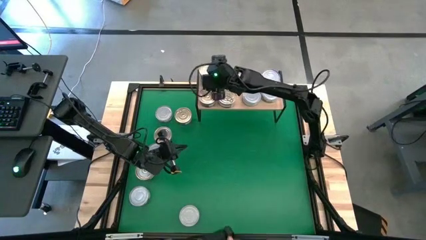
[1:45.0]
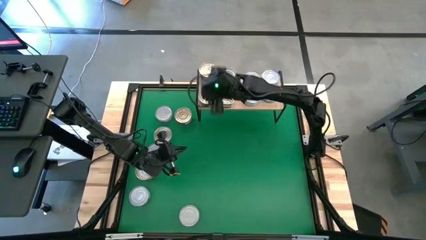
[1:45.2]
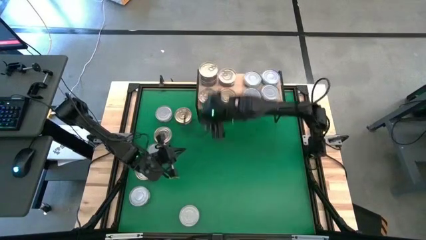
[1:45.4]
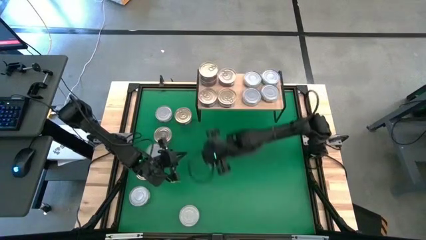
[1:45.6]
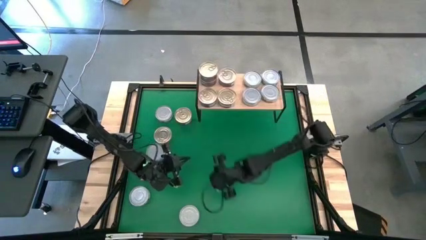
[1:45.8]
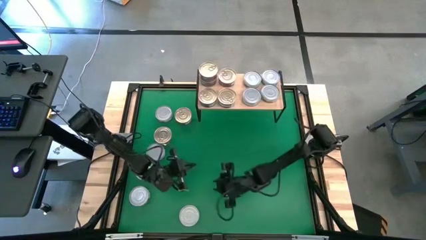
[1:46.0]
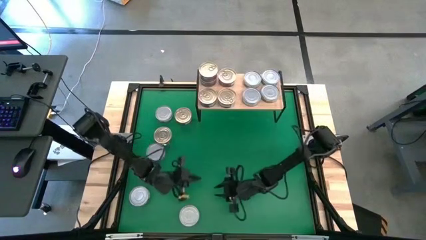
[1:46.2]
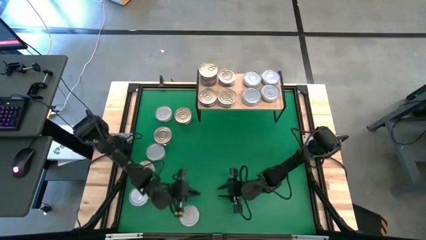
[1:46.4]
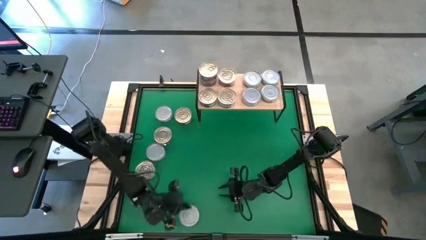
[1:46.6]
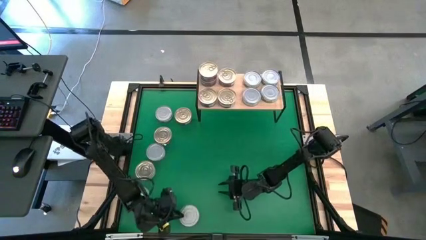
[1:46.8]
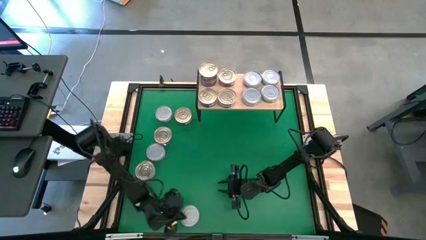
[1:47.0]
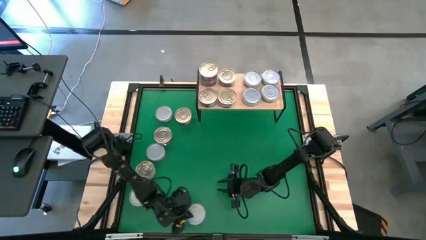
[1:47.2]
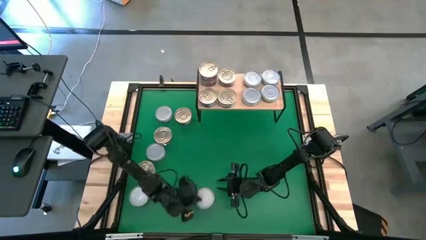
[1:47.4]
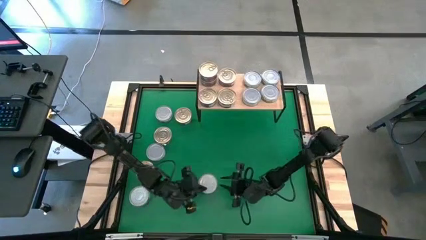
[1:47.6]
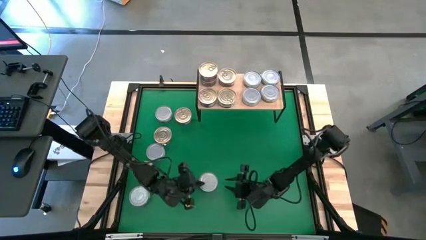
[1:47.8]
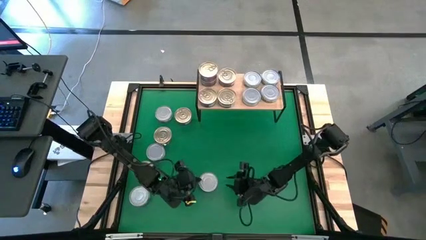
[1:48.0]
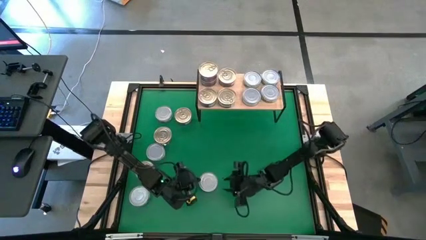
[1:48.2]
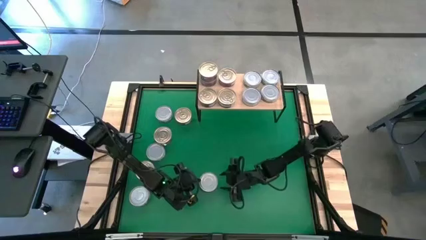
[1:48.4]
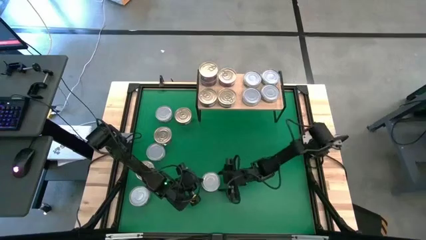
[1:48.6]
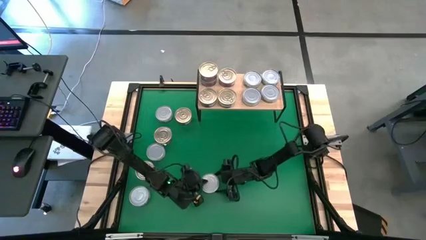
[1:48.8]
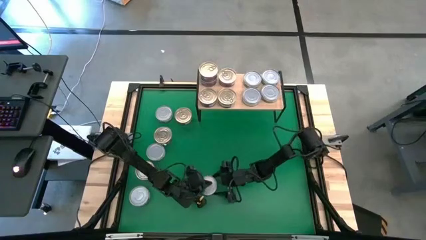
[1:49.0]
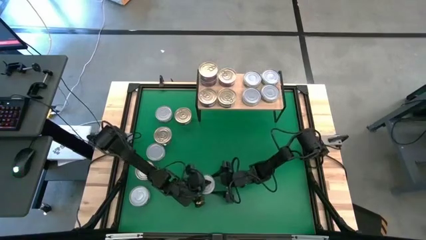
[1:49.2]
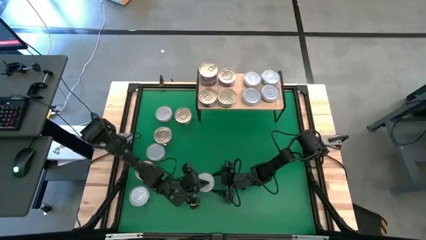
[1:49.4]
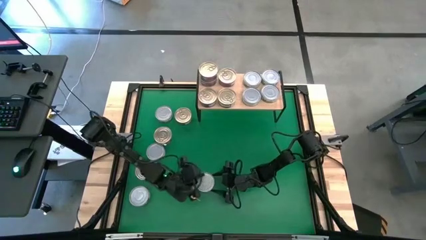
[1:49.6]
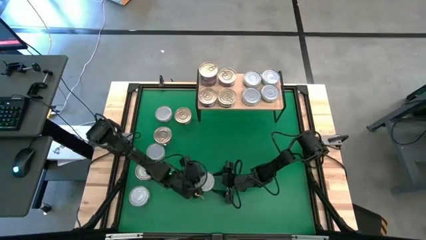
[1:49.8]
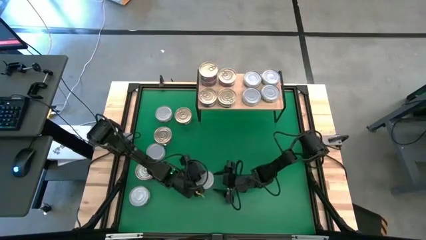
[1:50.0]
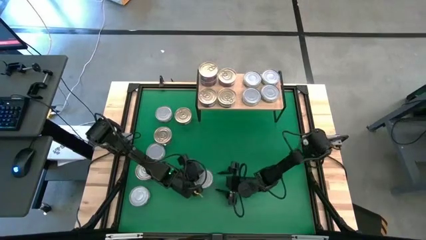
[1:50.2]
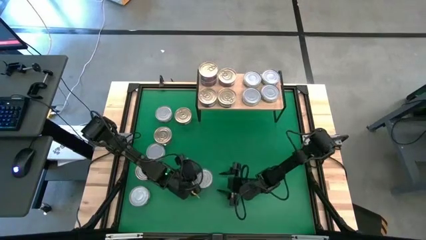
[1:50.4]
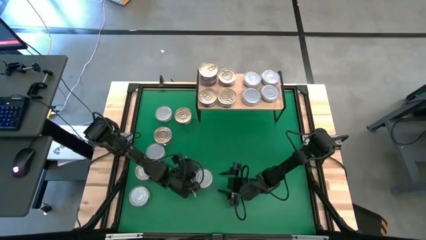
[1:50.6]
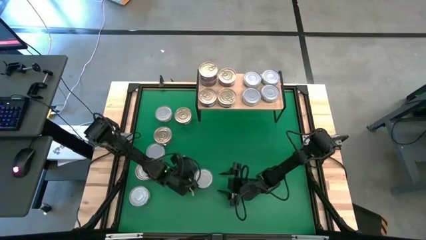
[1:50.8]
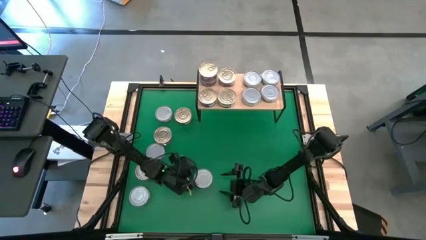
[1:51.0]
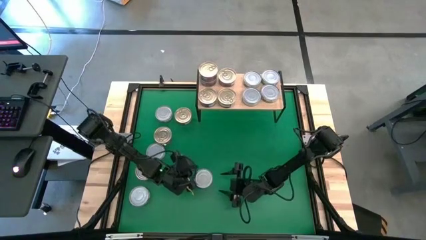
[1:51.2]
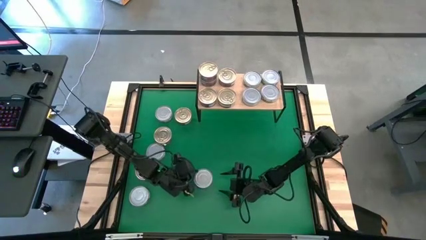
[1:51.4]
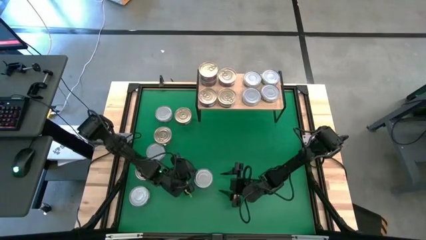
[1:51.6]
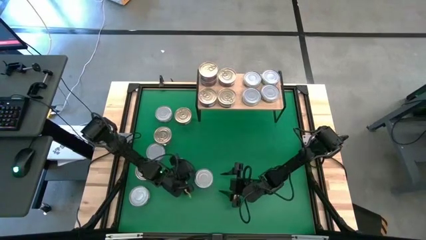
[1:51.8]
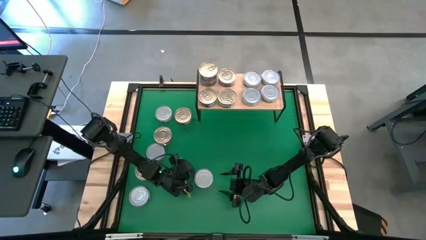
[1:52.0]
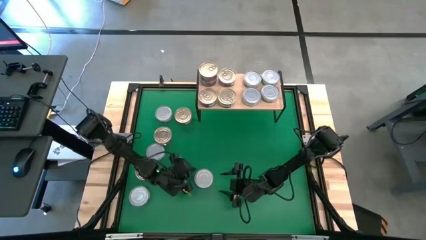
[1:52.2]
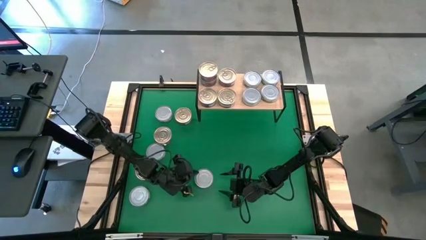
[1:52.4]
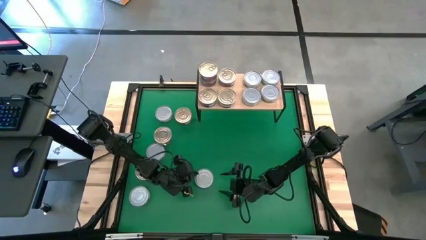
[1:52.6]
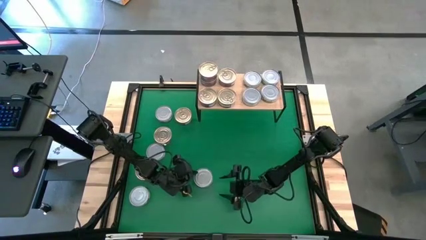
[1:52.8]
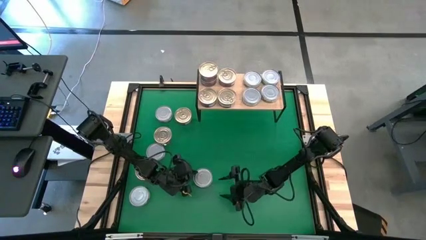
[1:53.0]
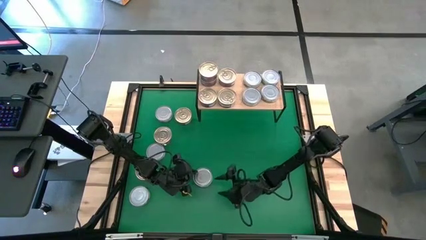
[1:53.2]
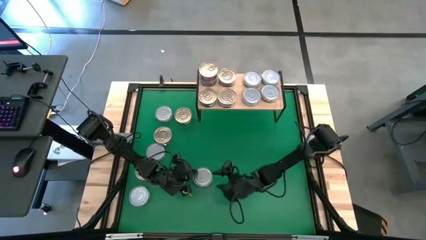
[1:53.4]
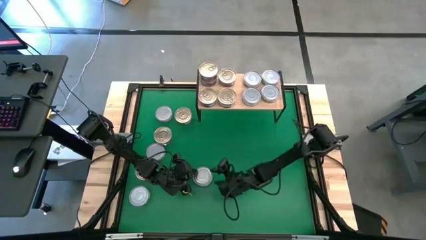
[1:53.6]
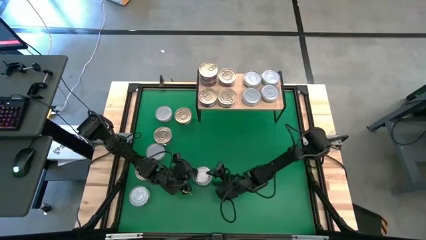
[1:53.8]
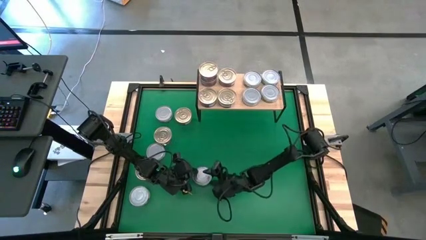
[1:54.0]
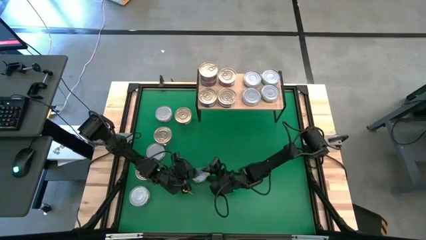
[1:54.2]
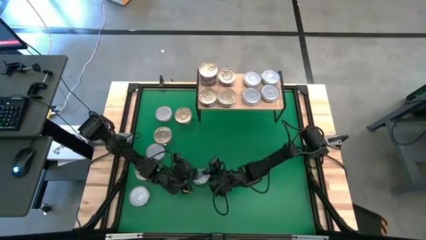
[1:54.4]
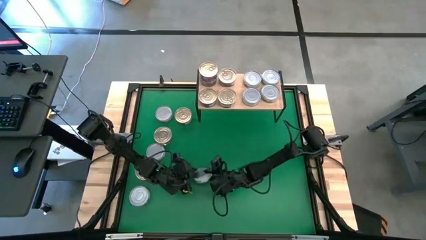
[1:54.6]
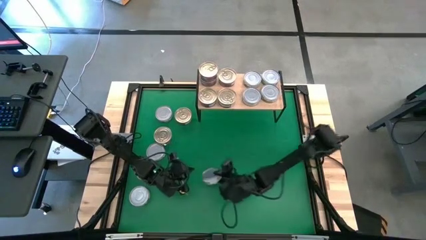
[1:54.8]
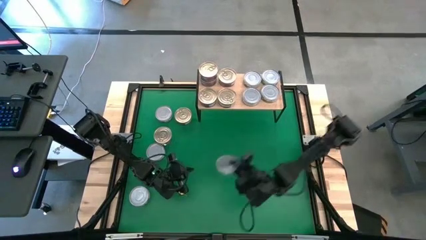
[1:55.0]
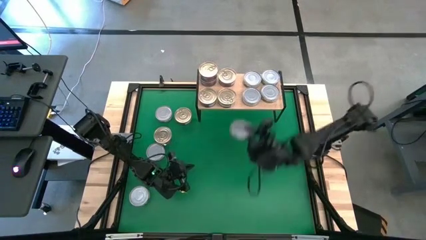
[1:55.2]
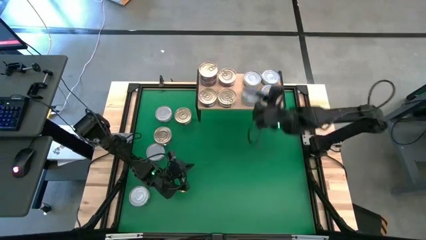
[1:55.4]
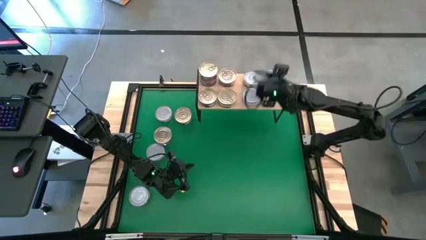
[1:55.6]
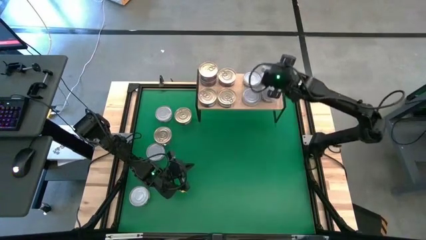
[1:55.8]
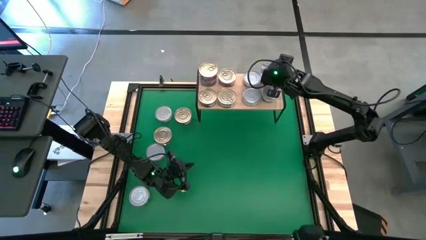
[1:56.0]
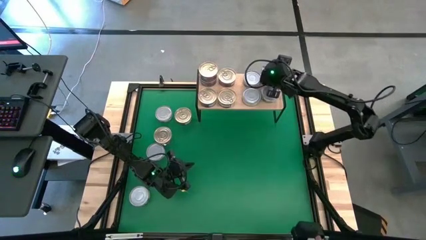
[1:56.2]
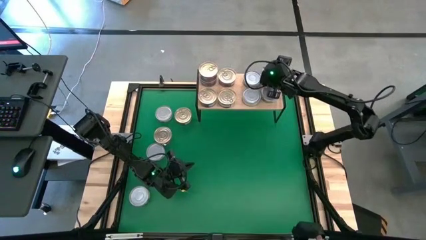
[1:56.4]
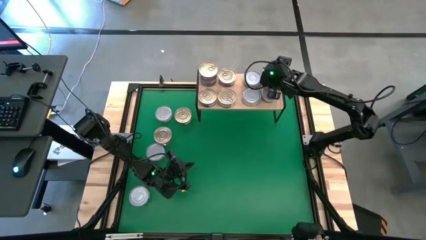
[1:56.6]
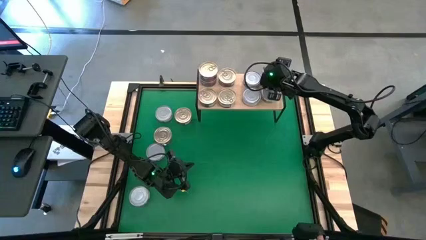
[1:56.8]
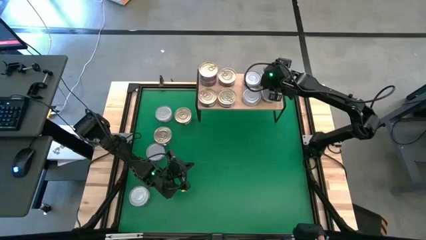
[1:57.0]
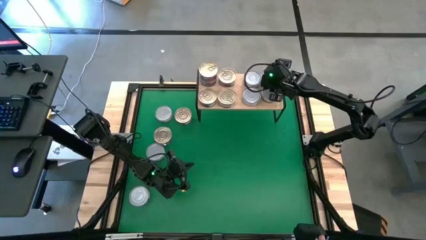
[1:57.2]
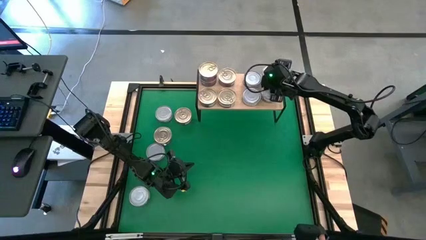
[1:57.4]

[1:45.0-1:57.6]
Task: Stack canned seafood by type on shelf
Stack the green tuna can on top of the top right green tuna can on the shelf

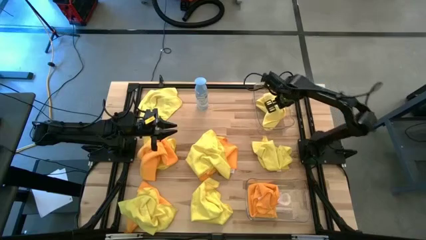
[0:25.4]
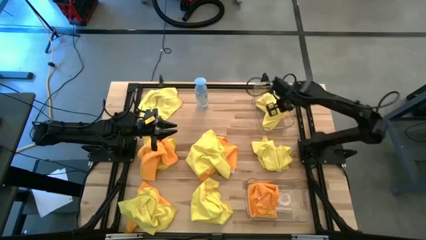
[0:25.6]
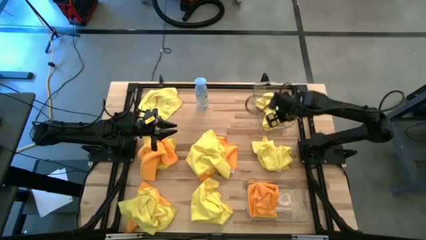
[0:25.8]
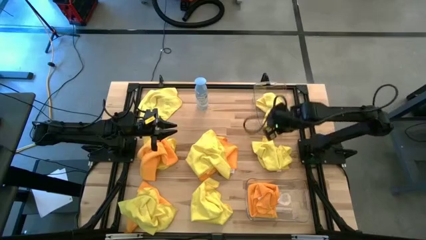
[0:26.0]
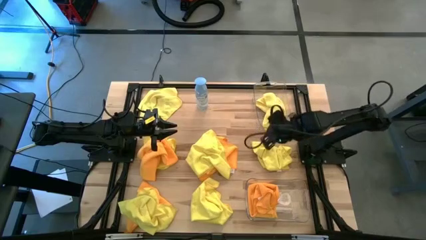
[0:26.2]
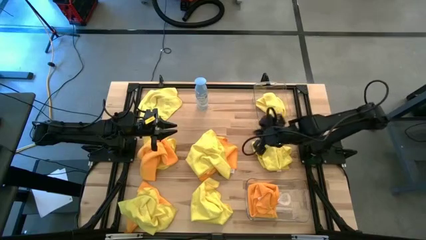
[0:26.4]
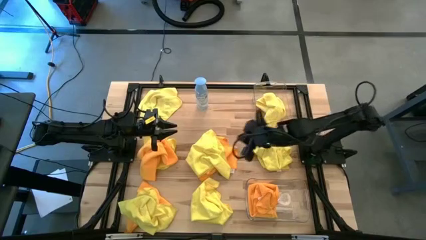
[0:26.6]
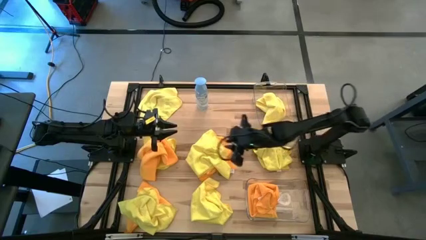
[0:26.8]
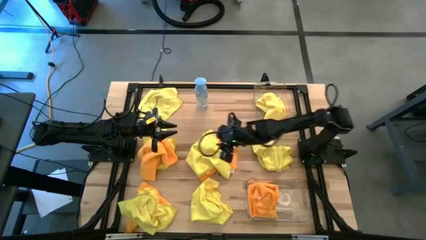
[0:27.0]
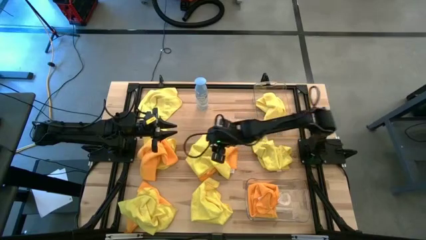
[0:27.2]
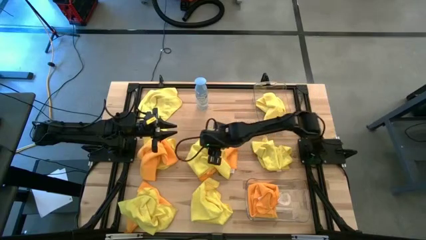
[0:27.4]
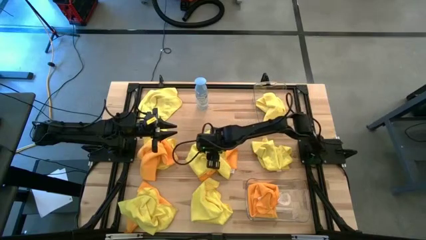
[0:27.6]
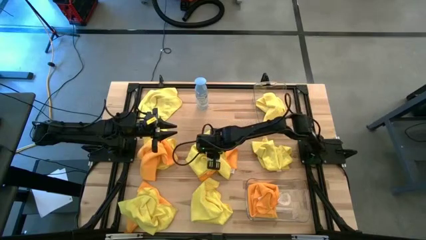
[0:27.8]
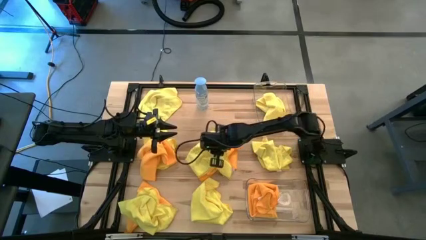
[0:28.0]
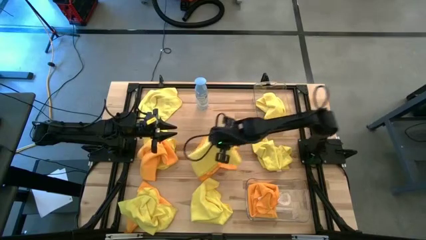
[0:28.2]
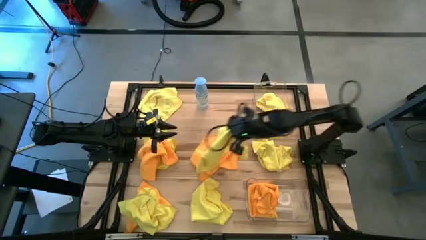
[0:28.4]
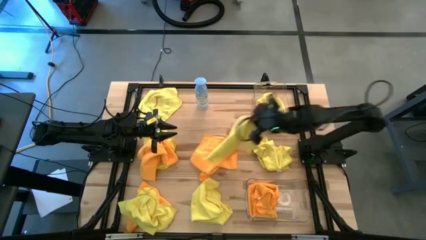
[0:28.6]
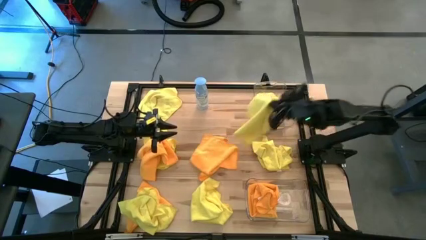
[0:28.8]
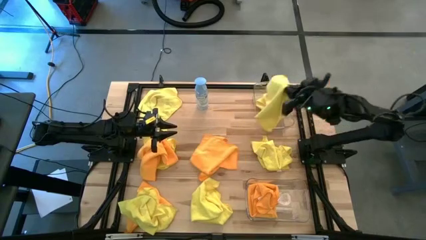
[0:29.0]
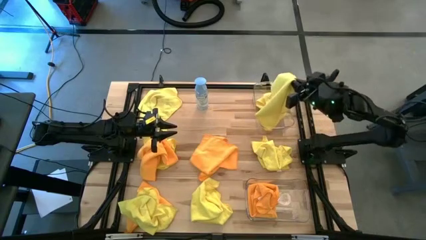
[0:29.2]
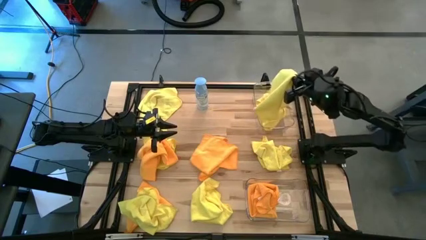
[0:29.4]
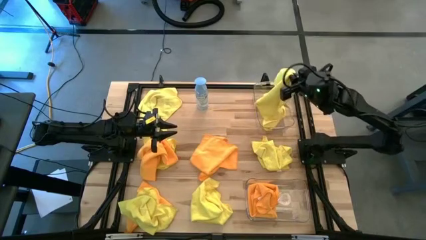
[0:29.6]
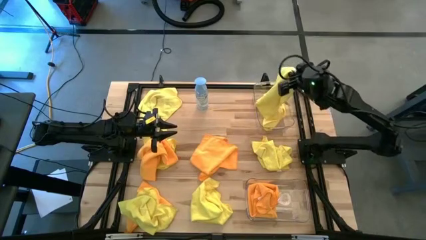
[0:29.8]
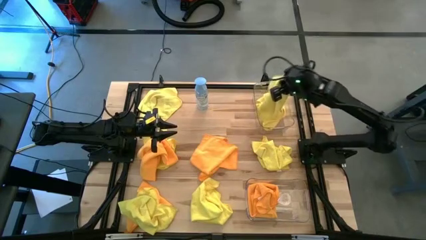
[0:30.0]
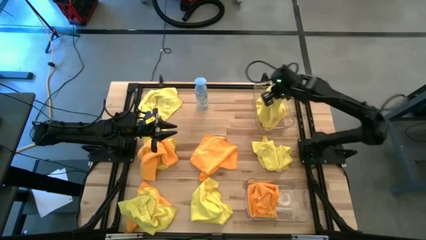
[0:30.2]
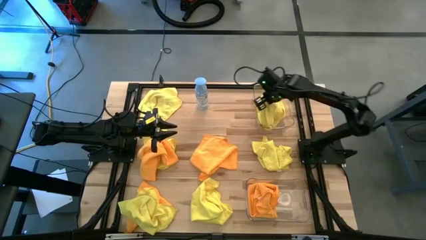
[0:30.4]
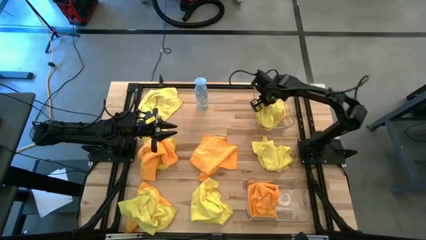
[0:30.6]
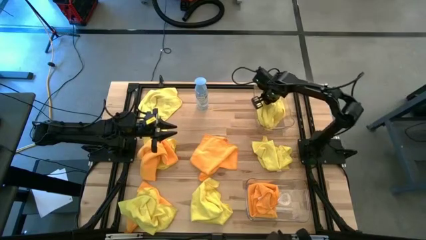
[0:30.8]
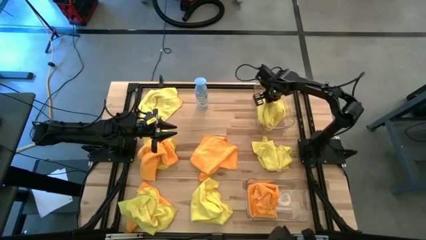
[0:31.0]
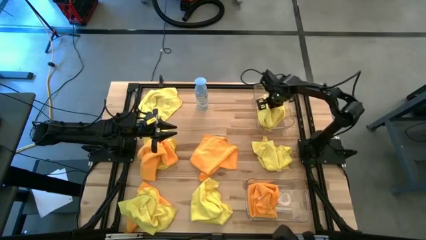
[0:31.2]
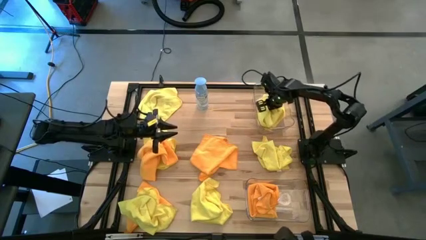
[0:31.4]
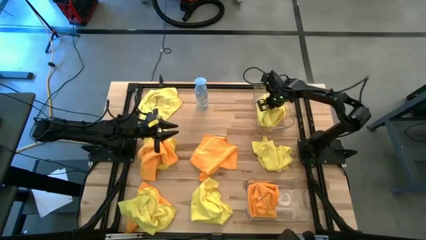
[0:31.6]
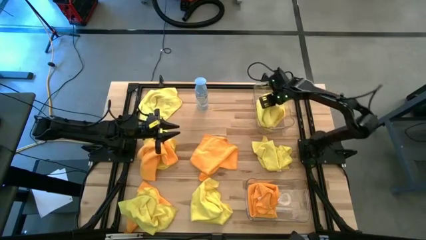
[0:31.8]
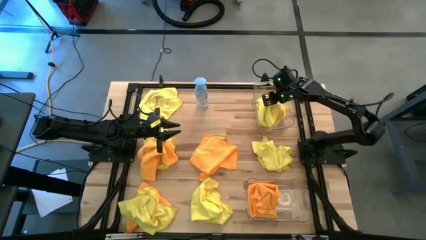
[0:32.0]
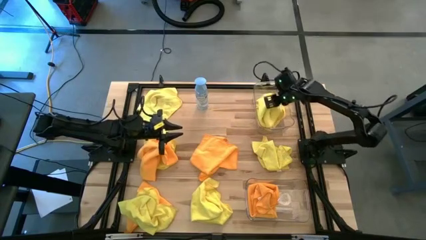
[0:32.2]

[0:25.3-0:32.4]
Task: Sort microfiber towel by color & place in baskets
Put the yellow microfiber cloth into the top transparent bin
